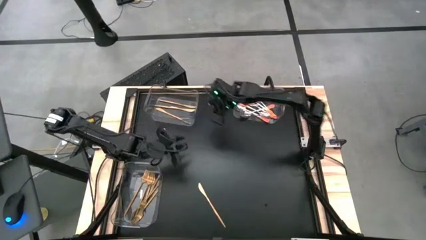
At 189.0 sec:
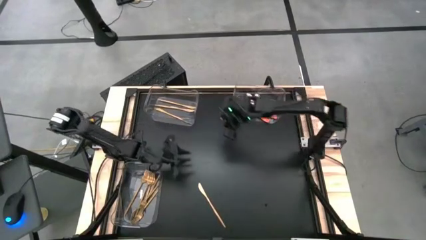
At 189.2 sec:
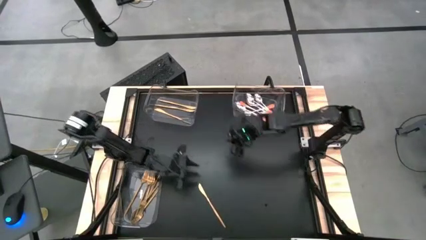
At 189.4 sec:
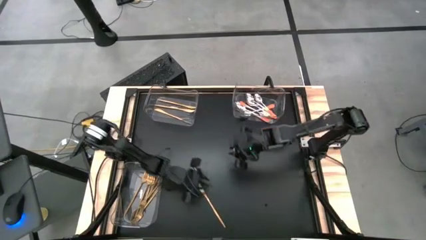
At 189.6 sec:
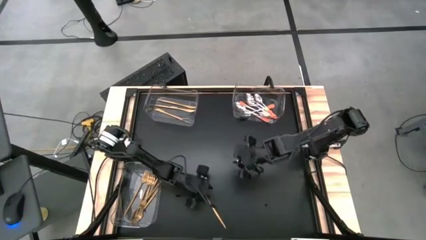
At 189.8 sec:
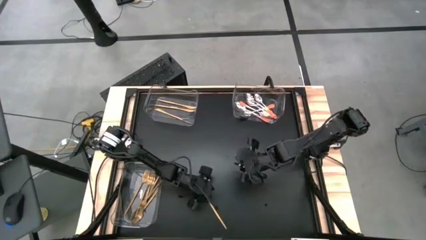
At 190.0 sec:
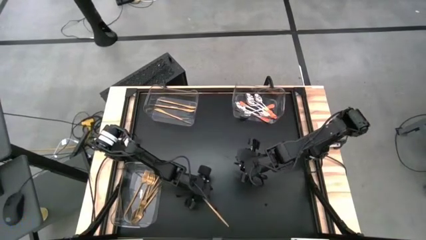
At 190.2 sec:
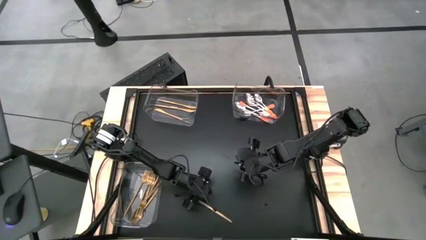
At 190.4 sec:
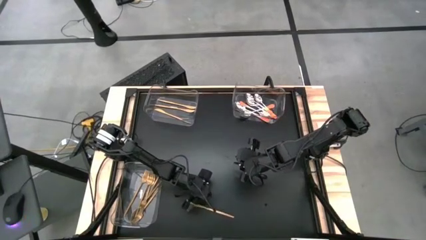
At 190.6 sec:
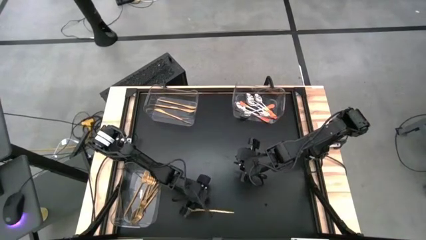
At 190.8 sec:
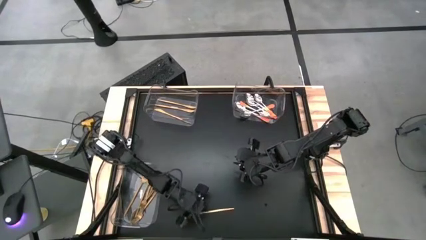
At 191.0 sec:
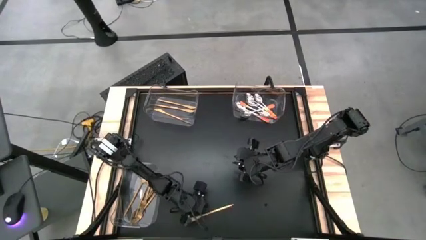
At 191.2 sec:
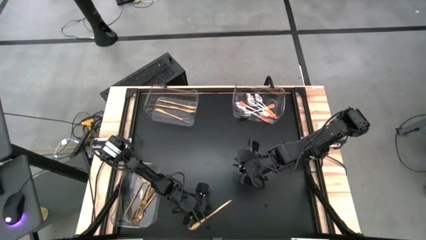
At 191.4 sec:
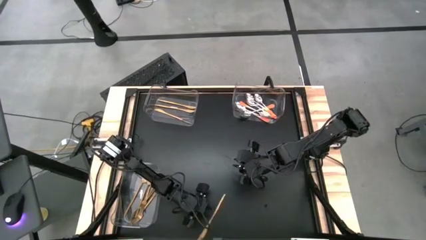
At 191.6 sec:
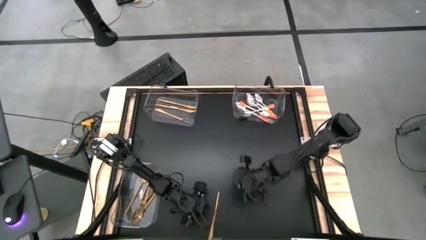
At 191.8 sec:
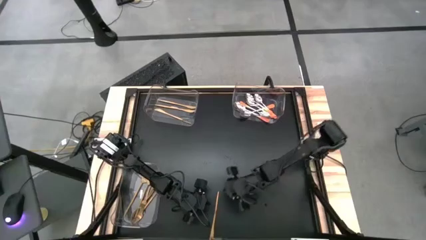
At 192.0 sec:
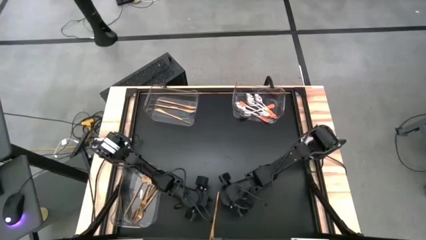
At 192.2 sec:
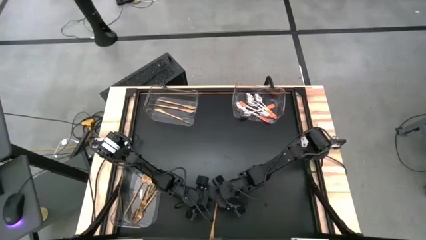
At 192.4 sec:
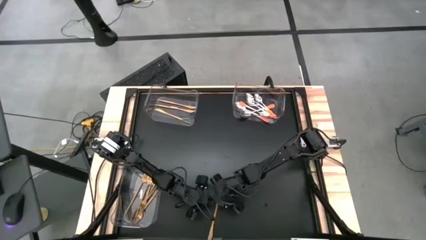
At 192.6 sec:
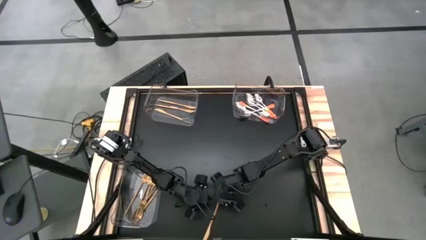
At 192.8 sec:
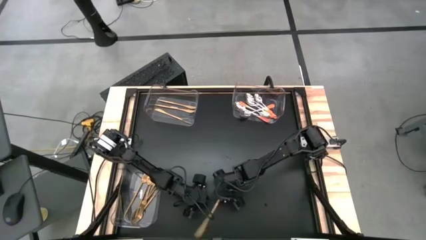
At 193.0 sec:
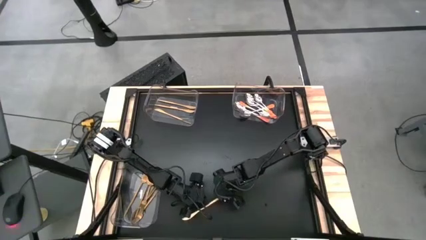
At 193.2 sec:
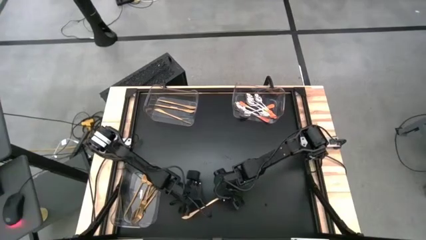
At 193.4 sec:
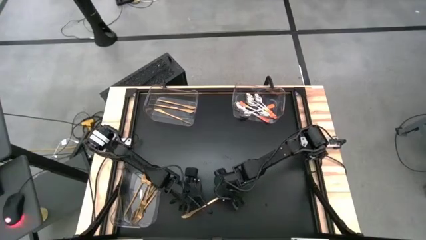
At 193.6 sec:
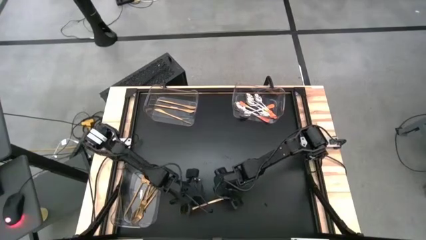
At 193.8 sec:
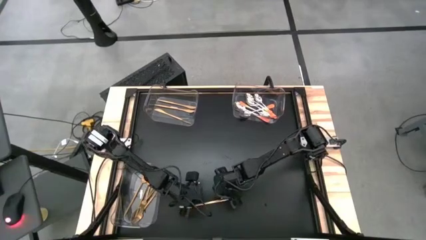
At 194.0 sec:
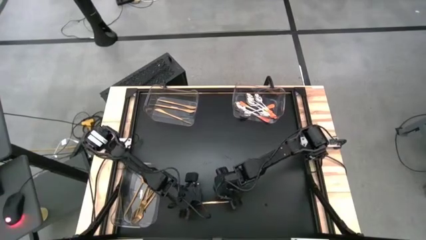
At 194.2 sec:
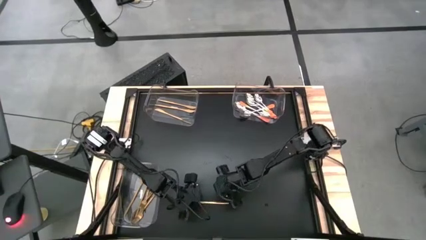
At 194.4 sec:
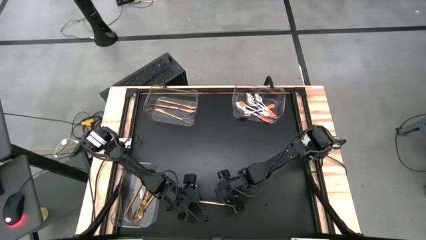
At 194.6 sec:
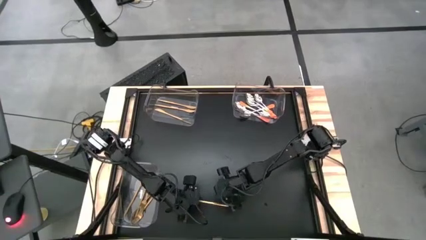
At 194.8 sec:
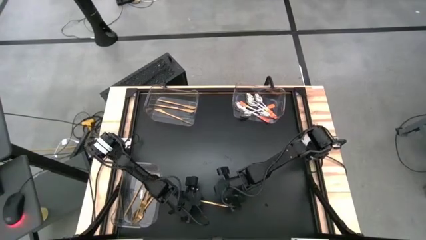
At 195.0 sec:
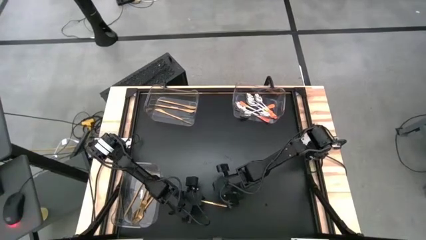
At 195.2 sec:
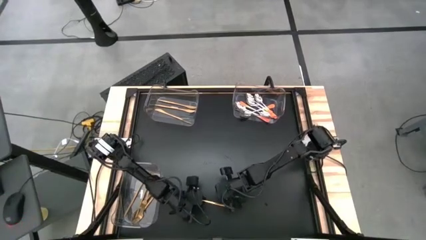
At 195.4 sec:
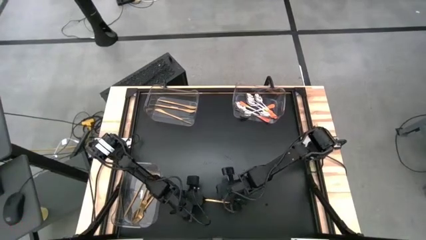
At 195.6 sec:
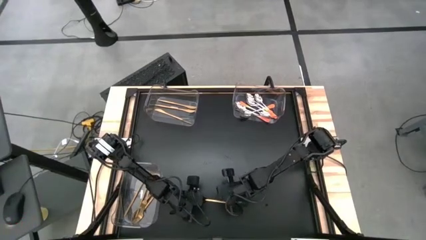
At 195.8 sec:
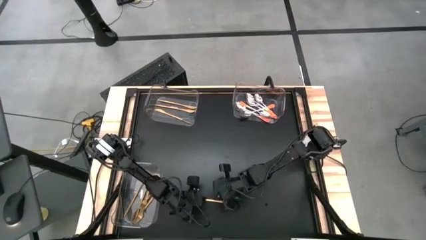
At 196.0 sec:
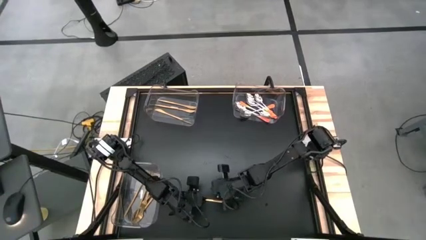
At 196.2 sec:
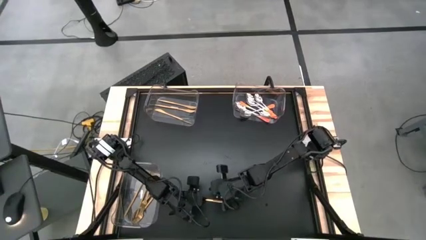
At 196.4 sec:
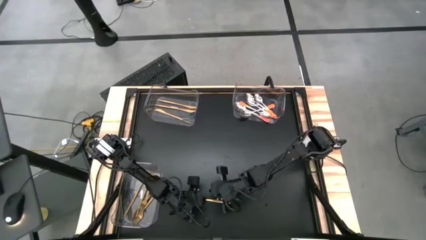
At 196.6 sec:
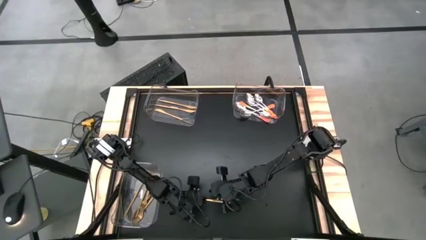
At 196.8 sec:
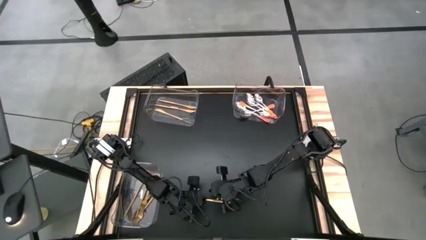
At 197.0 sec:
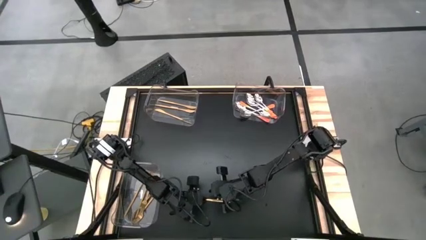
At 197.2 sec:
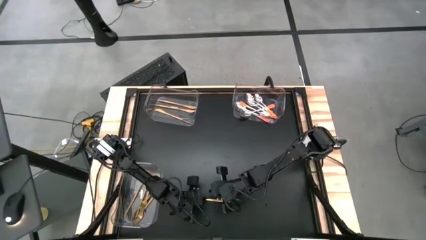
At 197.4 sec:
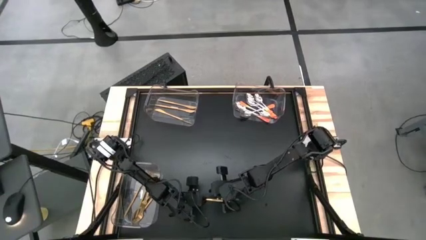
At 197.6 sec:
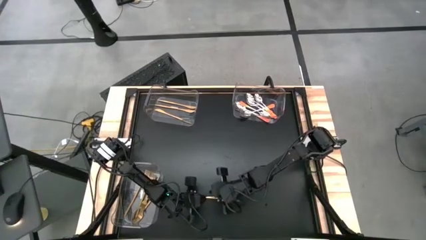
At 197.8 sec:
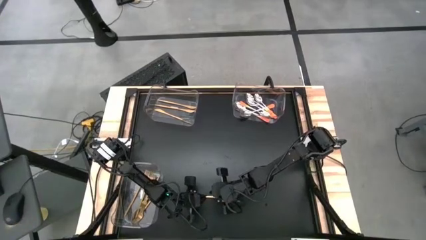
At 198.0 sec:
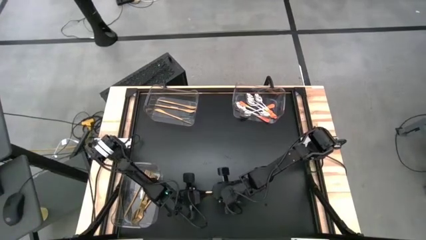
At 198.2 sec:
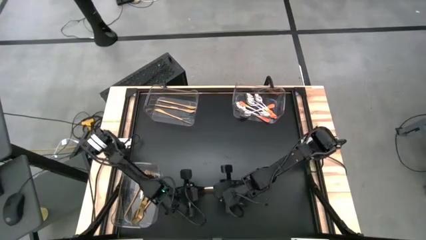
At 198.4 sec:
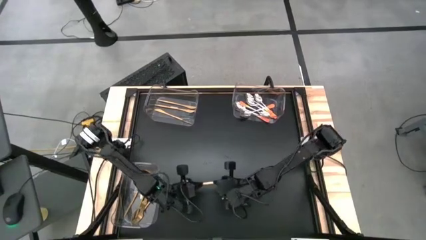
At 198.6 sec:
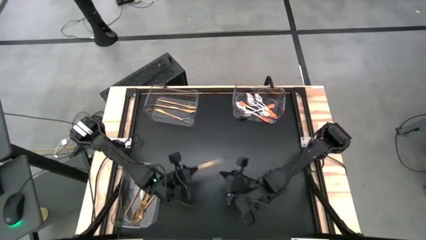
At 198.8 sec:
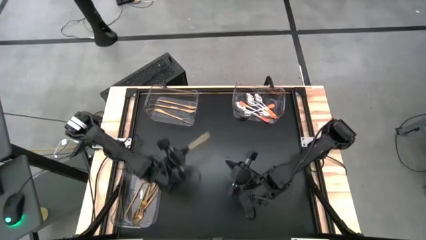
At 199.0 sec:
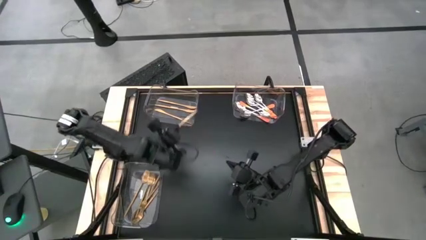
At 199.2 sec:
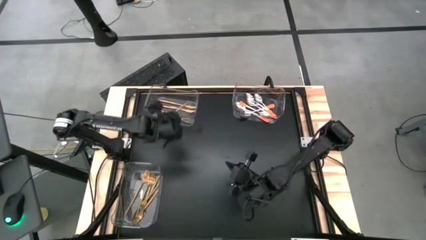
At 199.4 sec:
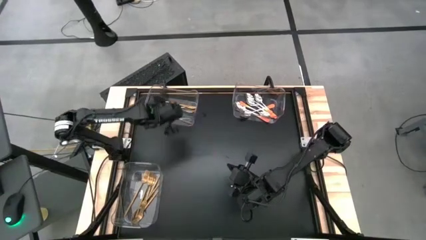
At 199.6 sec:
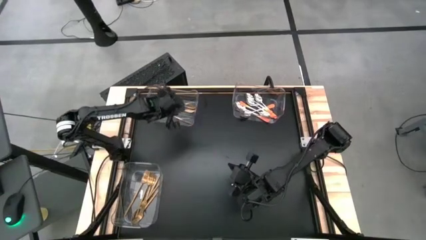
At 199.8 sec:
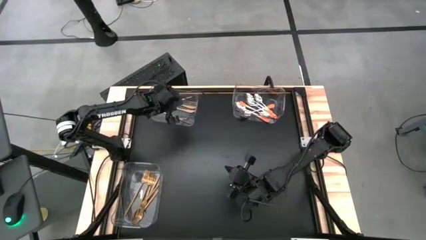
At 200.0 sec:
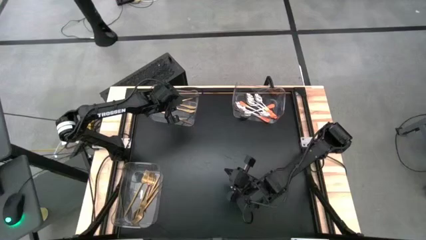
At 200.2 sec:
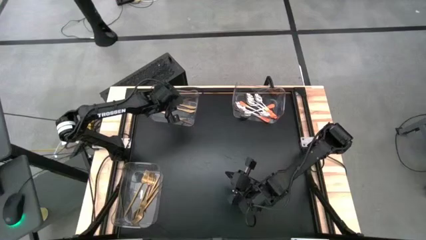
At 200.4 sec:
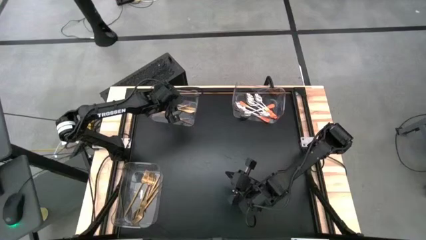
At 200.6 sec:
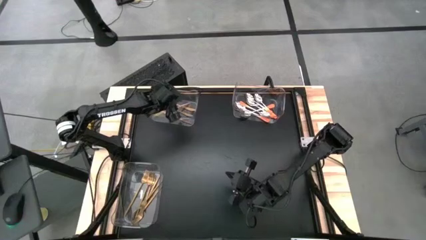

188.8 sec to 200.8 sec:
Task: Sort silverware by color (type)
Put the gold table knife into the top left transparent bin
